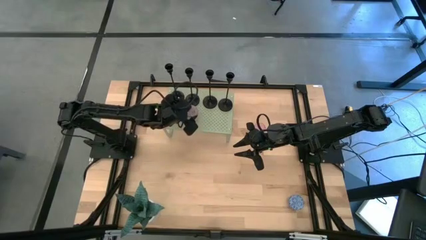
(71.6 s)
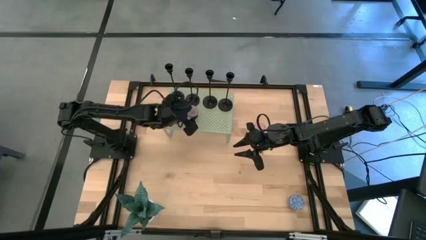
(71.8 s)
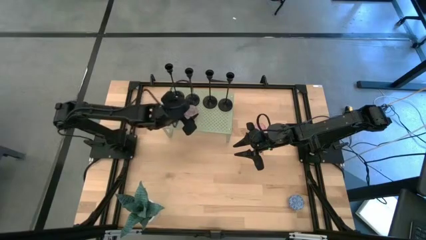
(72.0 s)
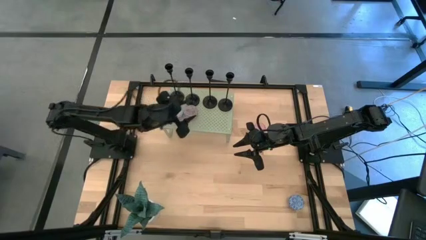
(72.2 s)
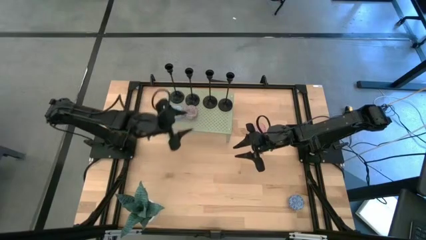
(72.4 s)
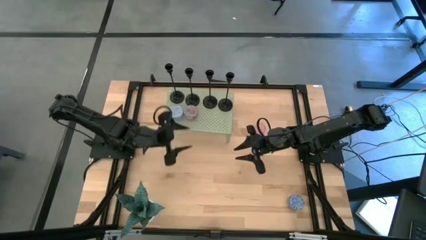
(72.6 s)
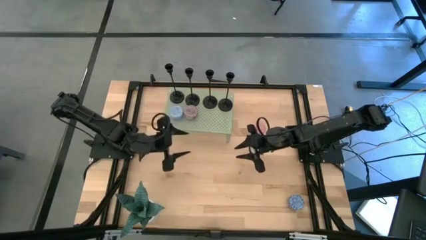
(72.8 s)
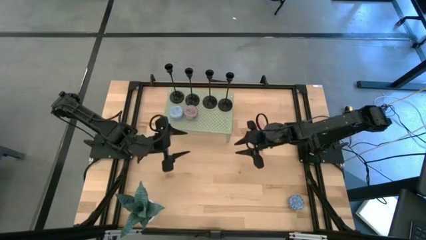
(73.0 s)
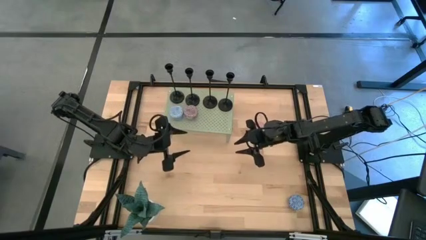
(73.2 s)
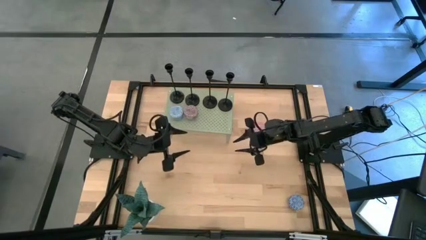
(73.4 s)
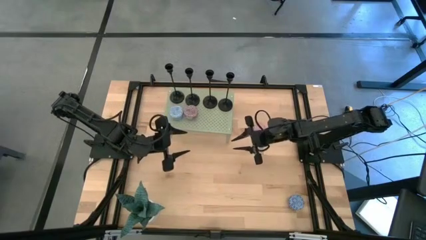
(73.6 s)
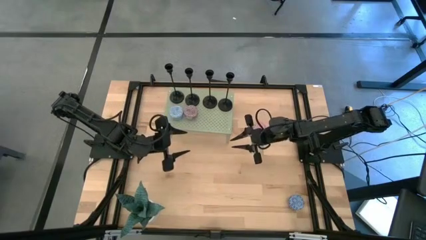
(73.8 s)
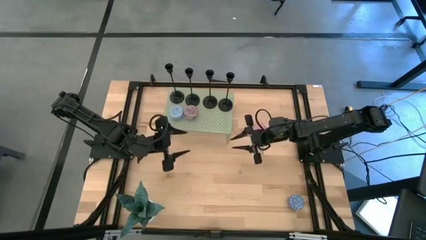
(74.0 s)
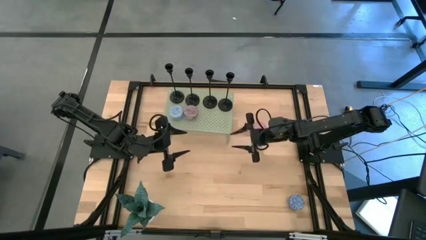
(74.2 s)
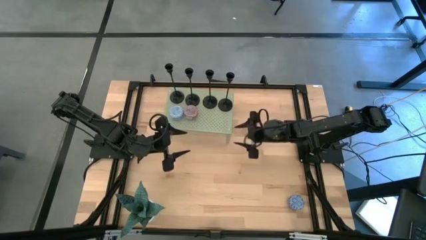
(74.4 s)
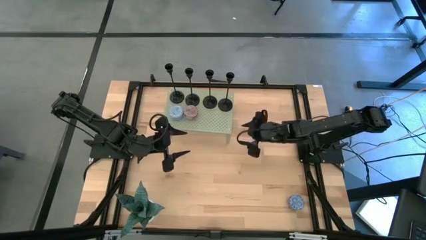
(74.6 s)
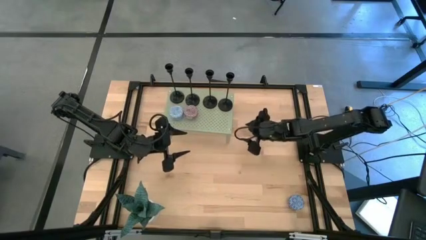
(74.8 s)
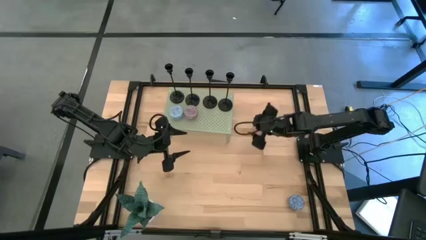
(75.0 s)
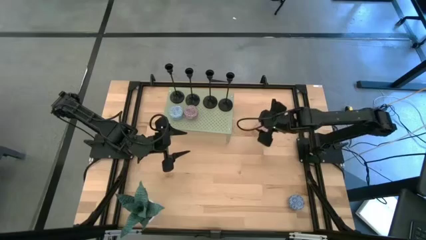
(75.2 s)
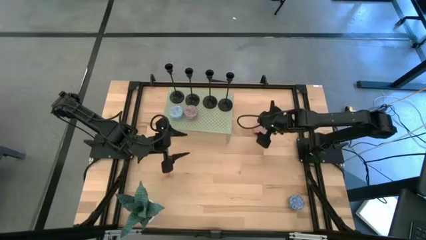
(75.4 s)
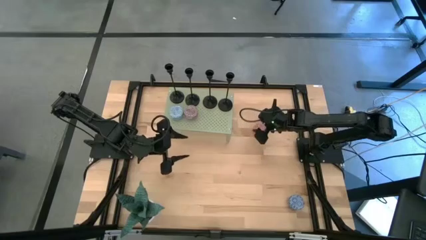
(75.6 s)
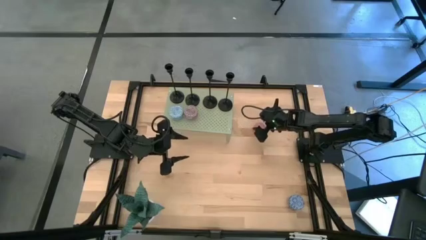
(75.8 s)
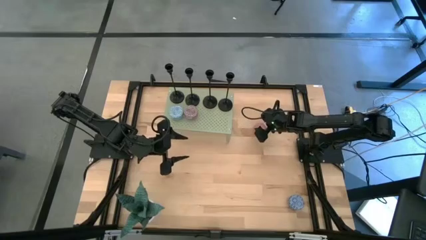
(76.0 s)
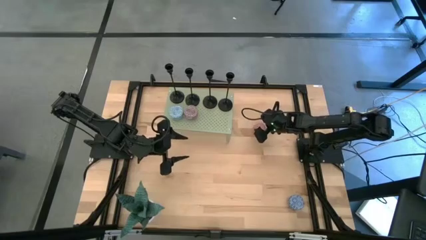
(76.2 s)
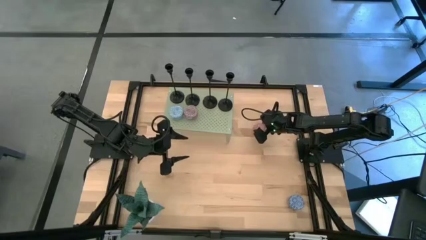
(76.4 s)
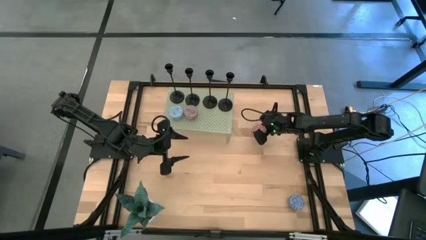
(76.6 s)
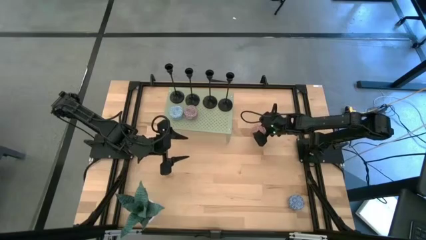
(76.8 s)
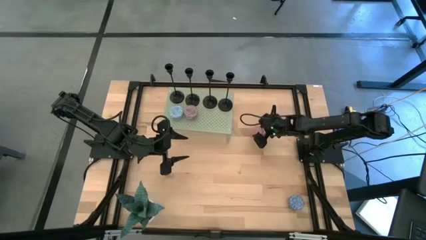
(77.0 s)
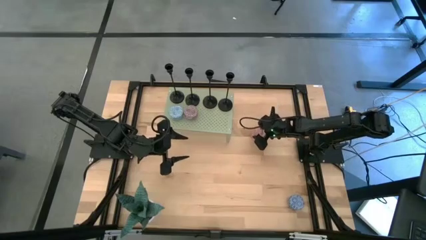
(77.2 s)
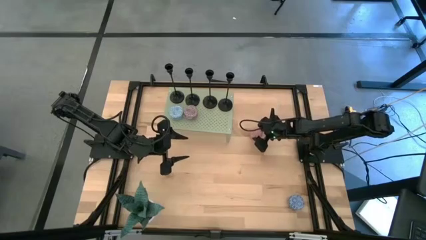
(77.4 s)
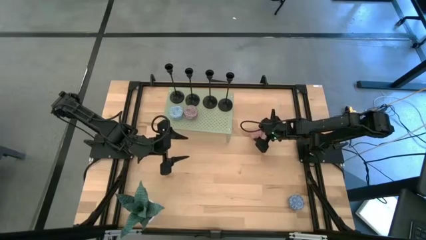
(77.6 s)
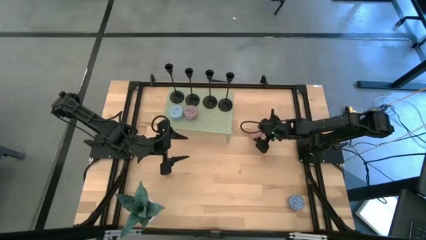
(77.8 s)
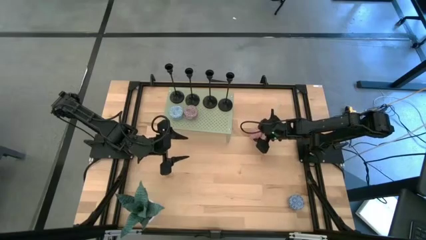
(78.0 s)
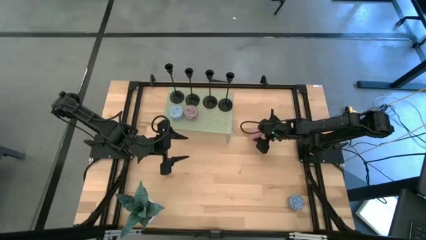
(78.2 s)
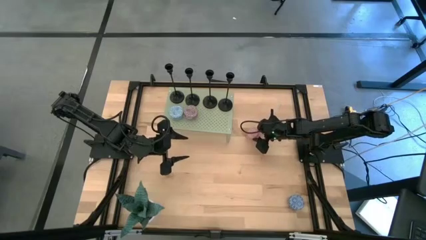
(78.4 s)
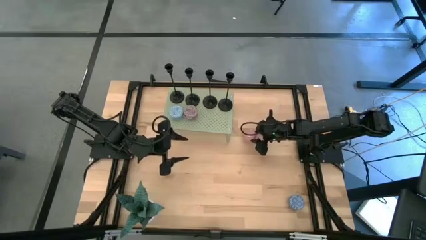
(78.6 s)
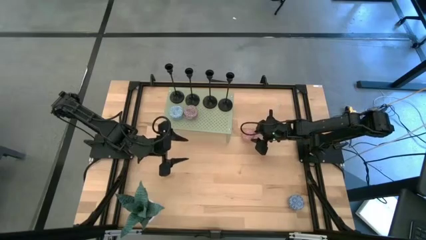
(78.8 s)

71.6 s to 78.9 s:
Task: Pick & Place candle stick holders
Put the red candle on the shelf aligned with the other candle

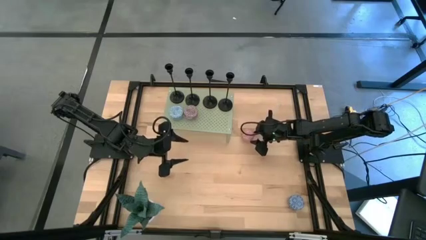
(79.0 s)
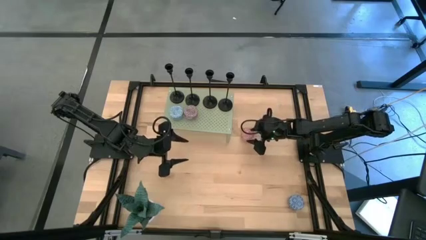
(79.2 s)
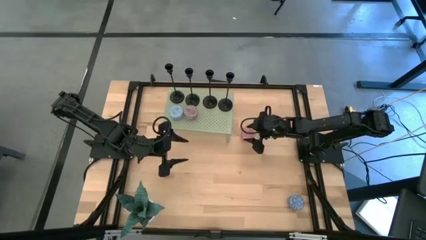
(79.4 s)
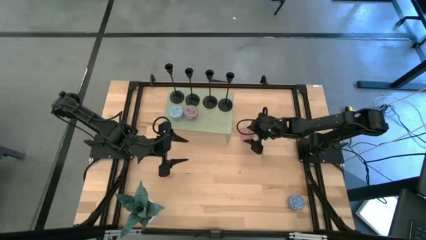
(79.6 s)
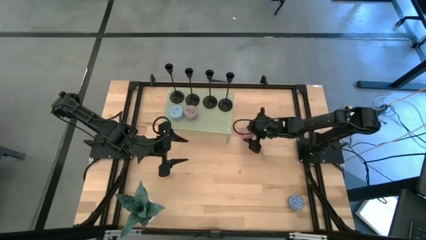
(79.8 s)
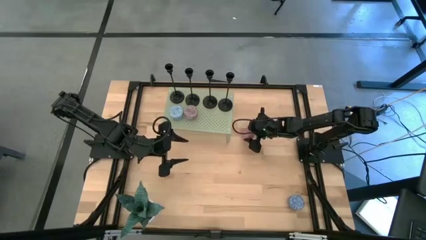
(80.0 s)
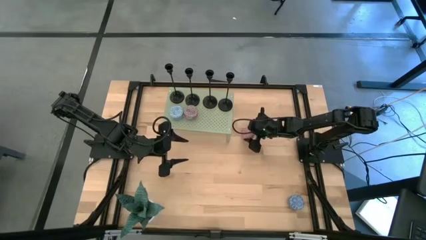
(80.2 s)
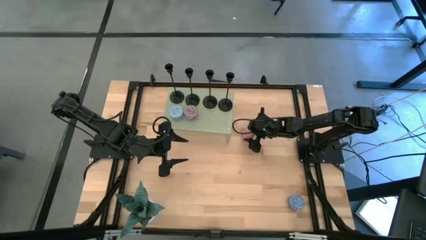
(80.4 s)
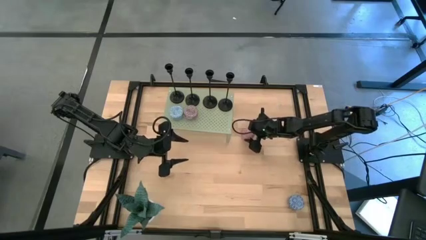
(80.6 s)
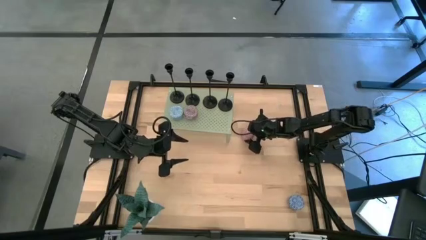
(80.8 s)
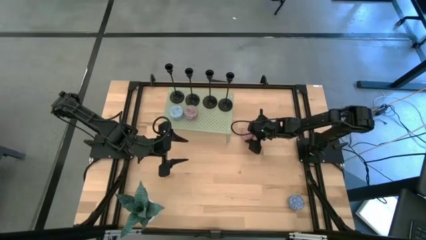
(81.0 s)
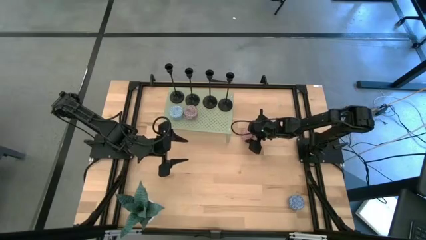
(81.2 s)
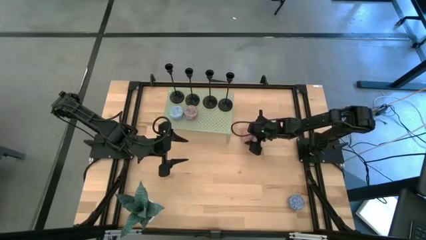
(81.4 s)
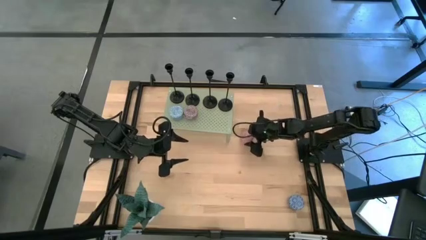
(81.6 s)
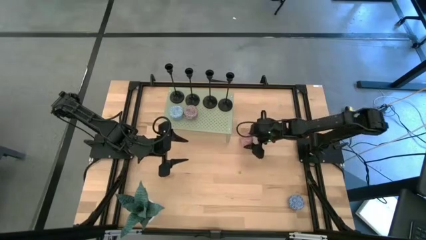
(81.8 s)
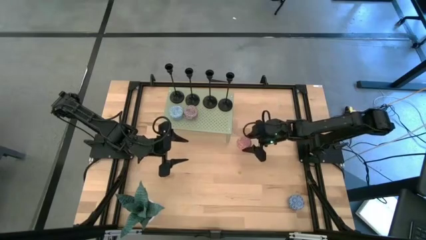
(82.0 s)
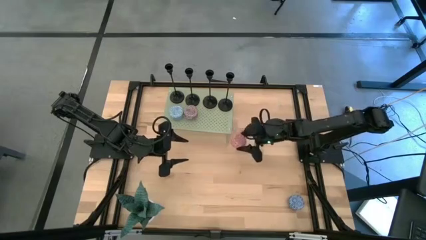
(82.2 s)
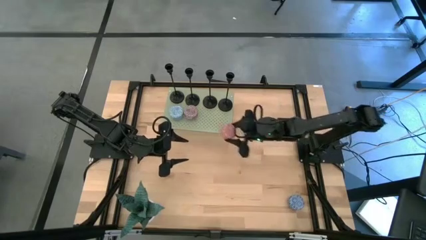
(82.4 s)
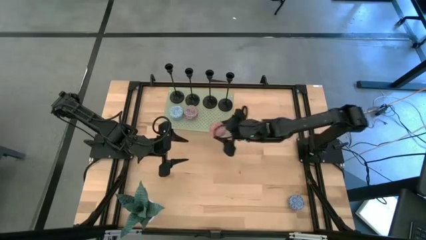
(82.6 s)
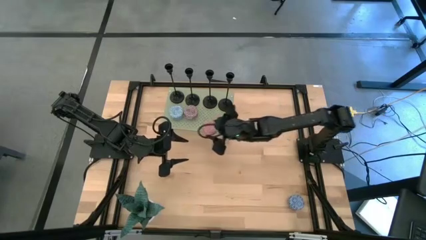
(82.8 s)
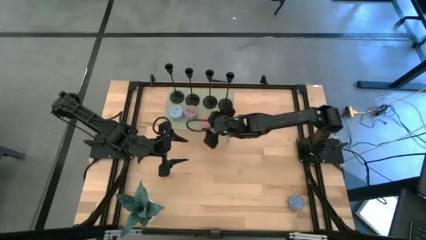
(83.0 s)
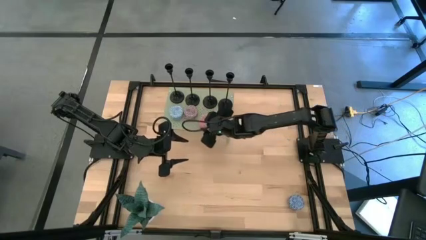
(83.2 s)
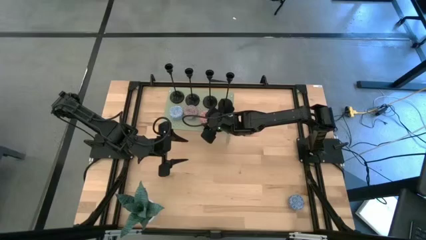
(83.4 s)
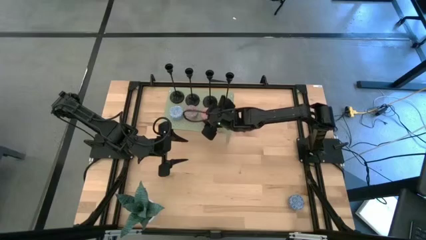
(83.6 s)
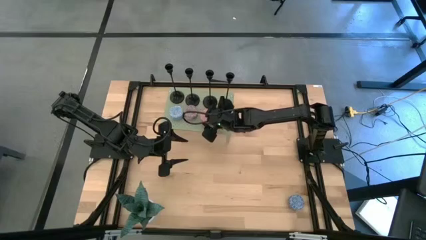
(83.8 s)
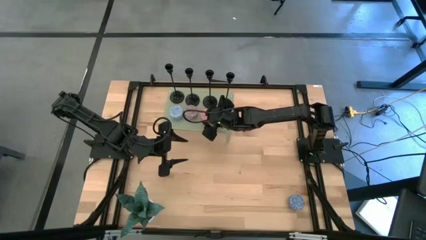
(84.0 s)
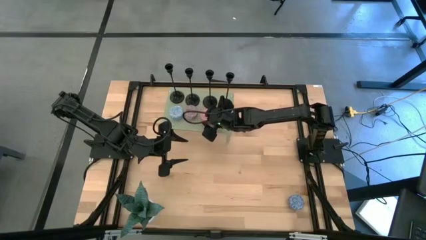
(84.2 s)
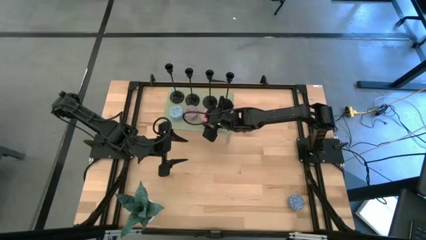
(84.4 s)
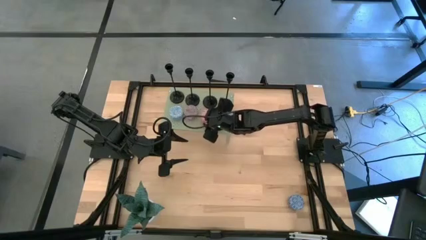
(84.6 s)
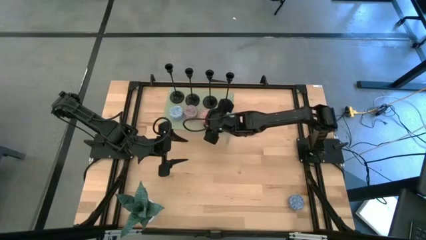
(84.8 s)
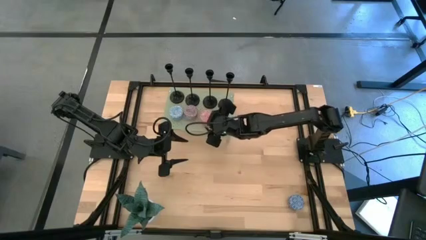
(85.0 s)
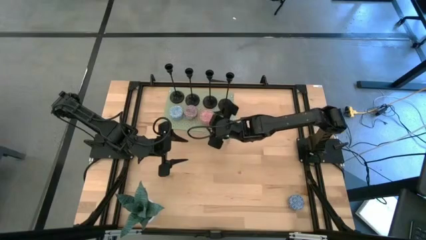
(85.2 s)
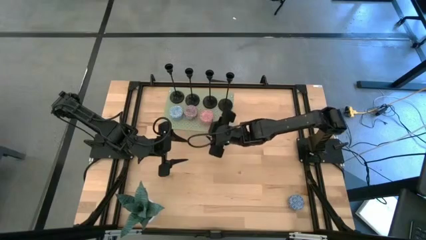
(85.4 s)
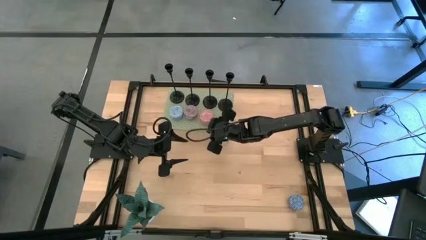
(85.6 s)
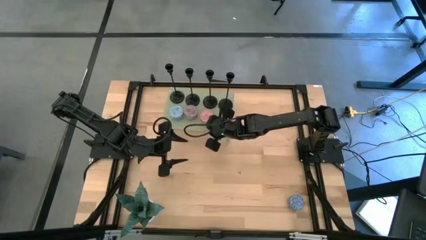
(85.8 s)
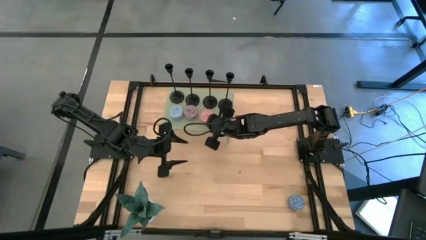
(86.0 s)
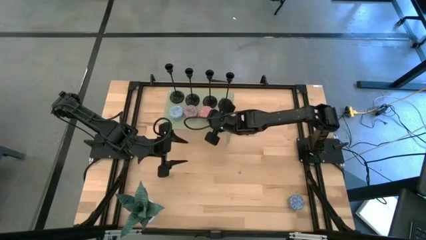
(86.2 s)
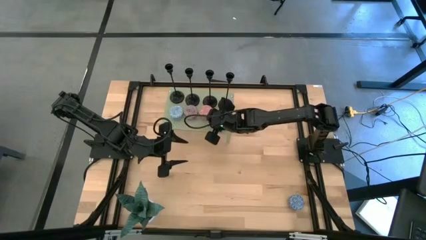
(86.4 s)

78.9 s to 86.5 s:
Put the red candle on the shelf aligned with the other candles

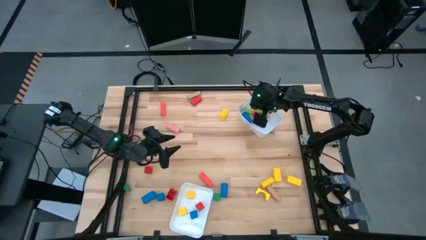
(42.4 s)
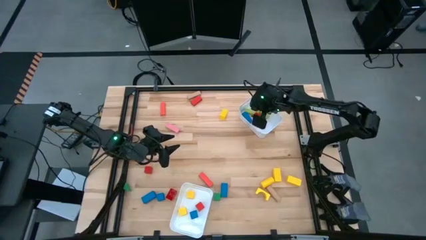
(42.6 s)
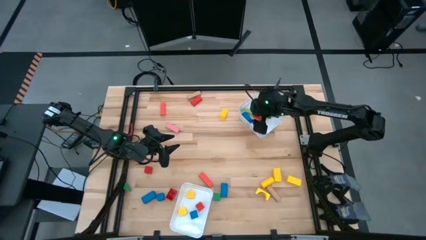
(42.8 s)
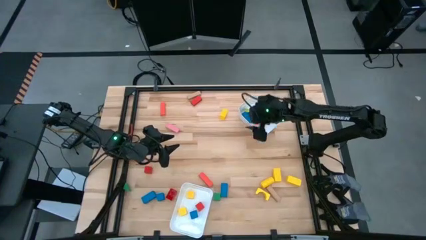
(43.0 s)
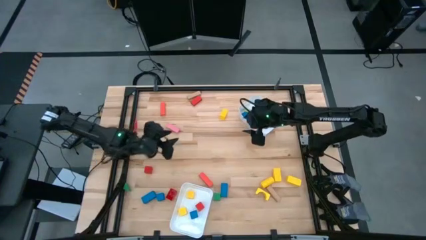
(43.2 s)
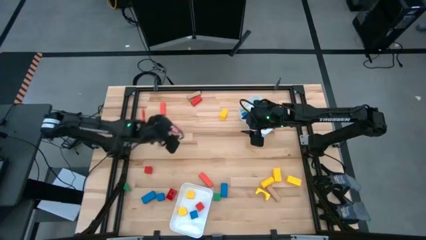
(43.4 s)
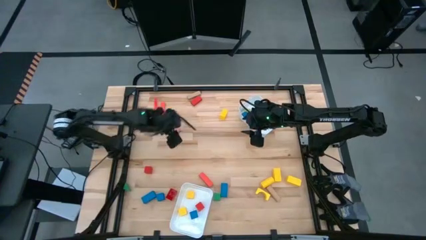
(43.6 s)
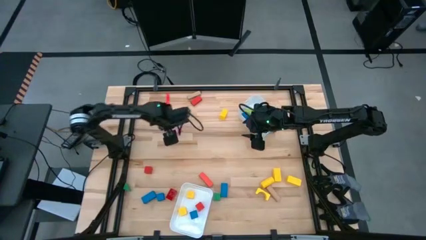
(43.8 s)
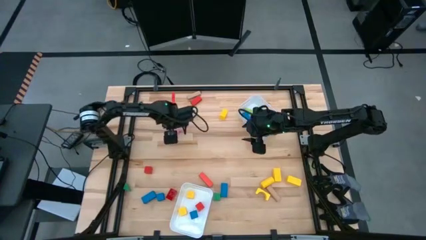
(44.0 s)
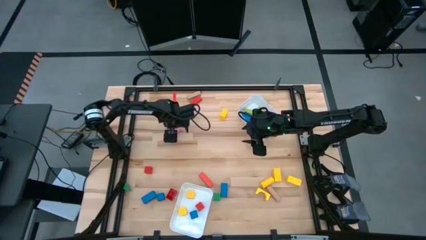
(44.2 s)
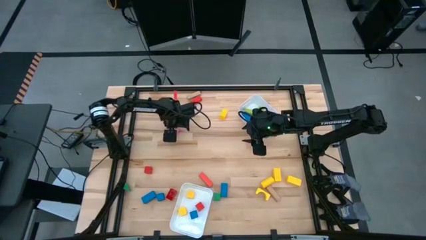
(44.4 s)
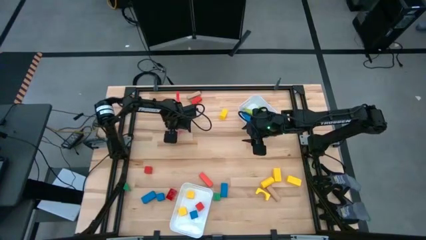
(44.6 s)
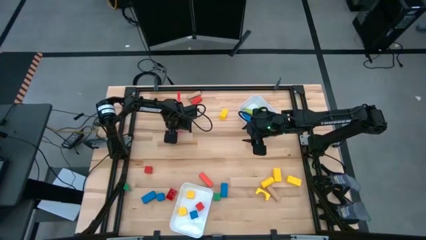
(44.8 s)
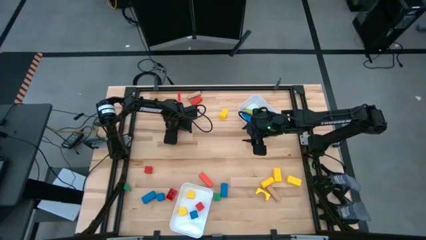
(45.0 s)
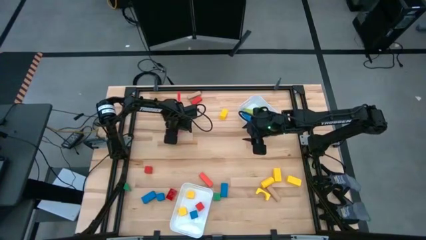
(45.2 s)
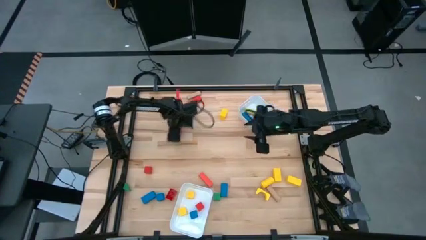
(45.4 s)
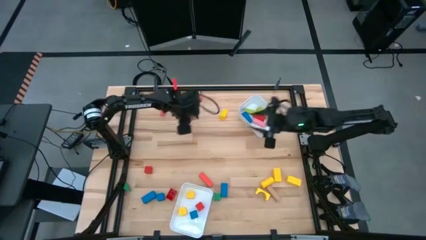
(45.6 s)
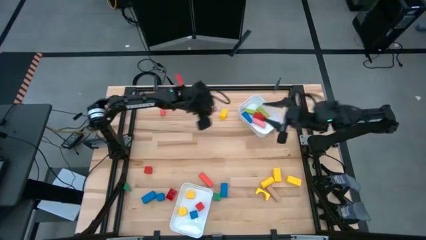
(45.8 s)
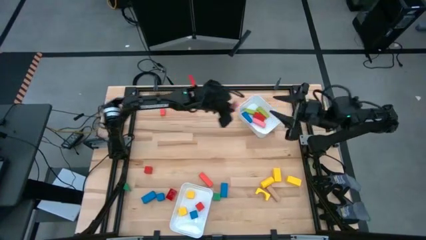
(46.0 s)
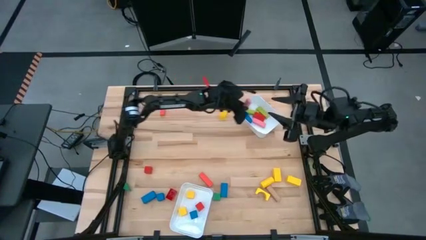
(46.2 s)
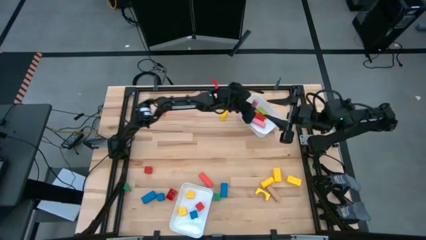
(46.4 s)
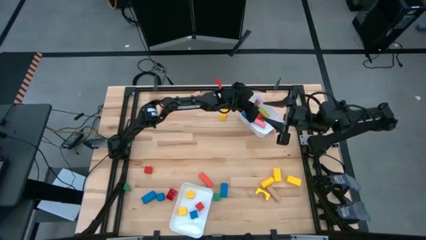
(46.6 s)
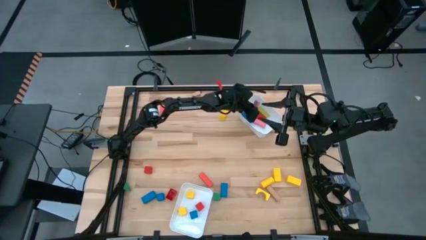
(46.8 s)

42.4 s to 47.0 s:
Task: Sort blocks by size
Put the pink rectangle block into the top white bin
